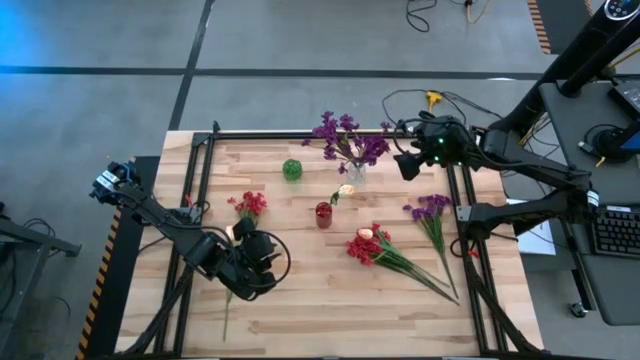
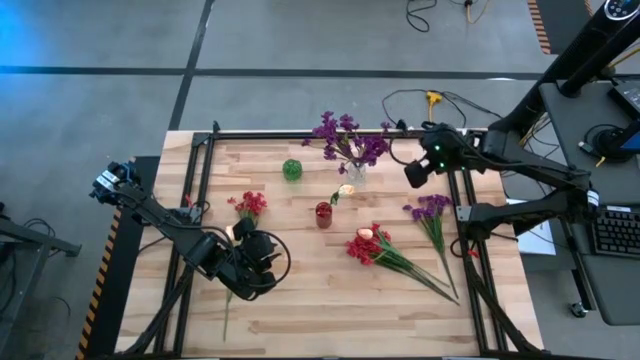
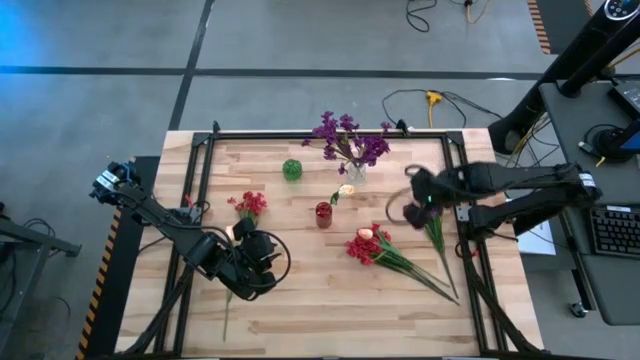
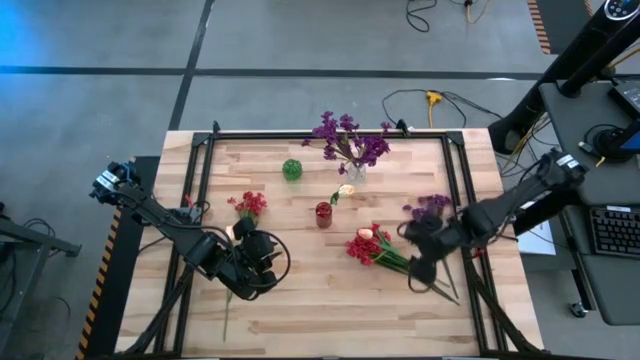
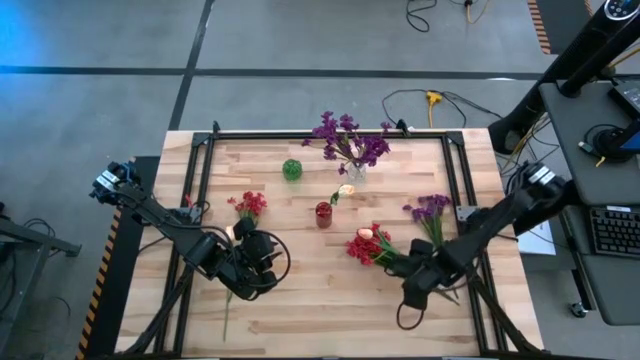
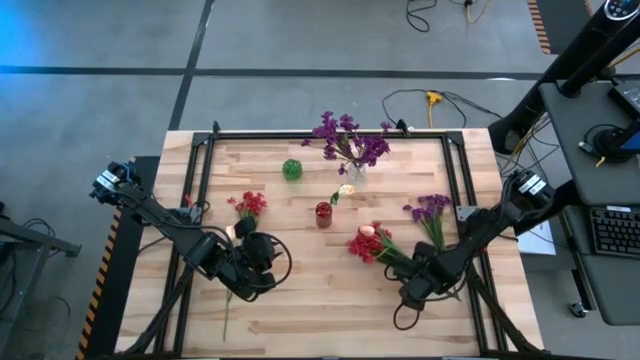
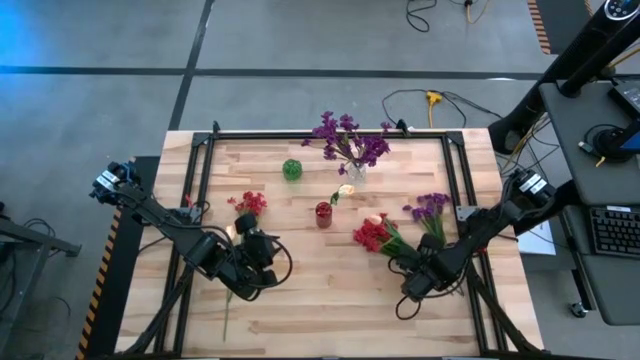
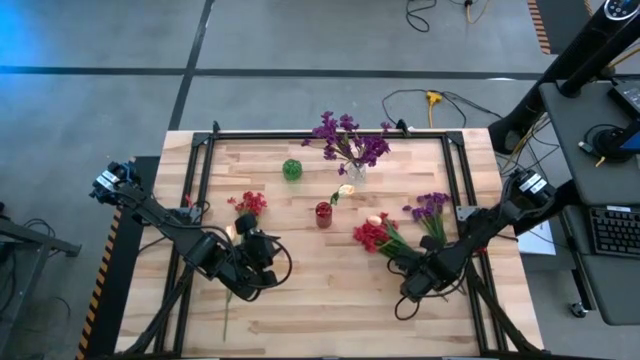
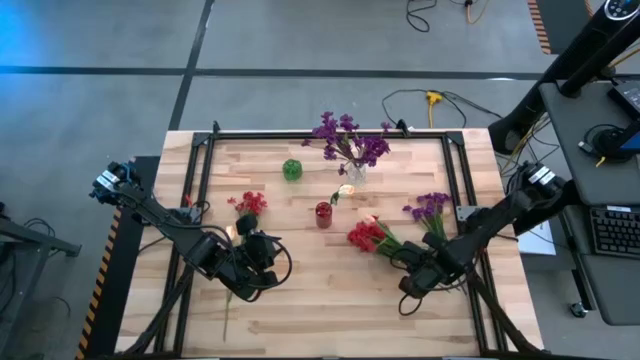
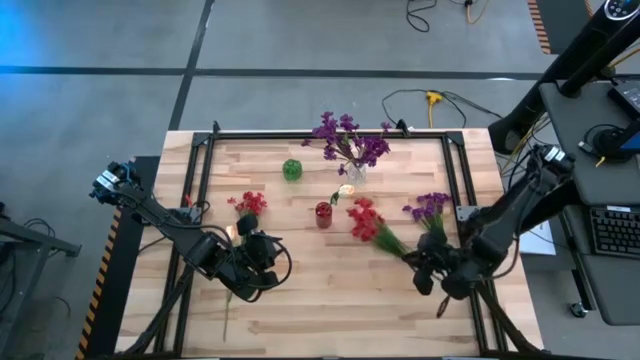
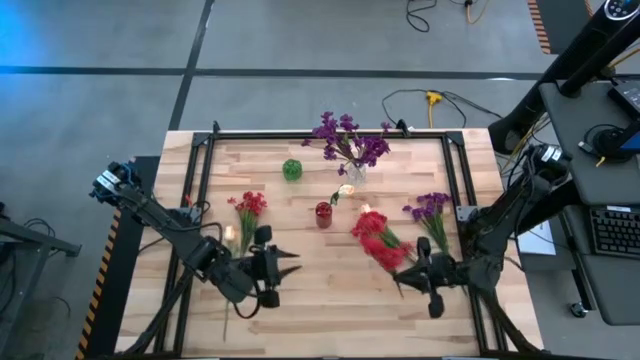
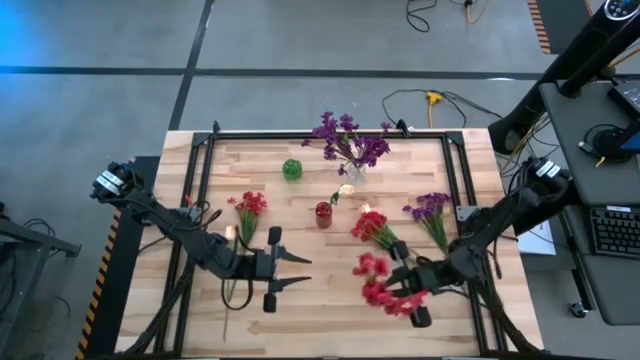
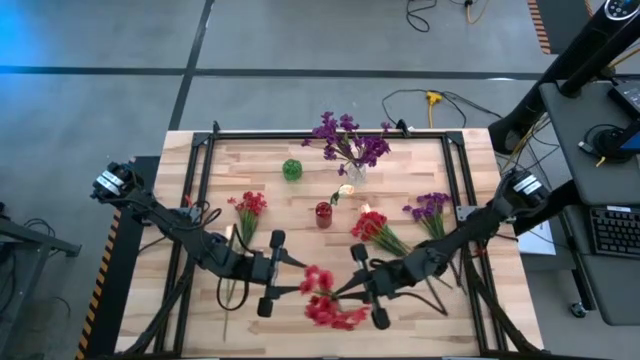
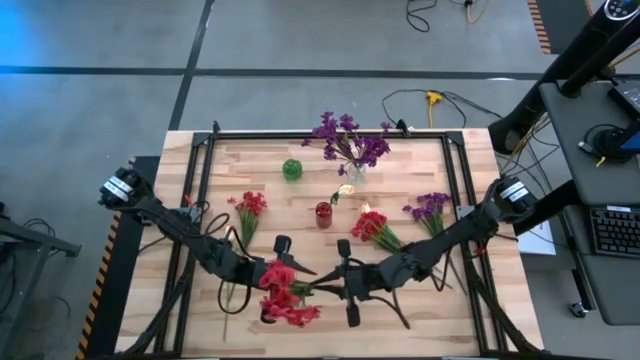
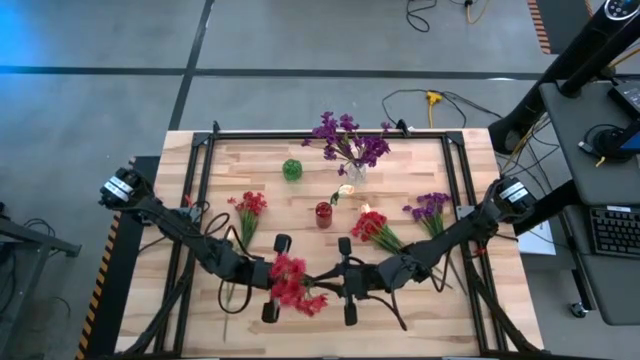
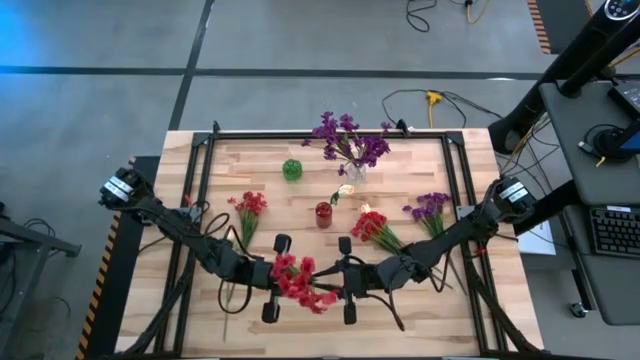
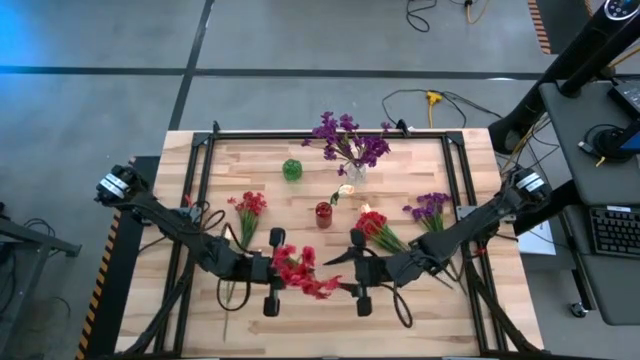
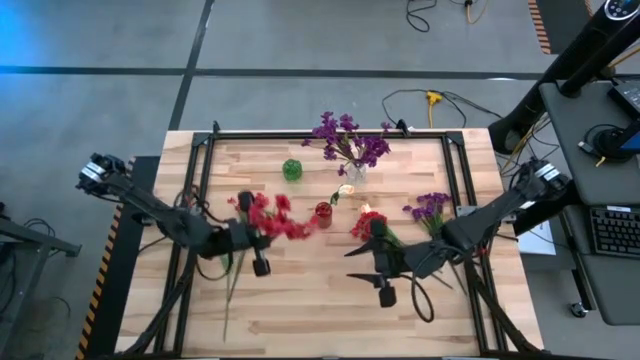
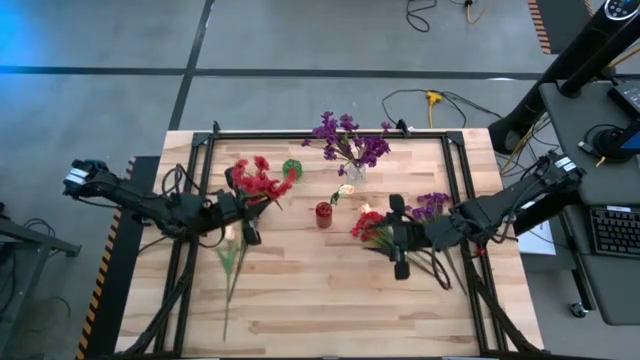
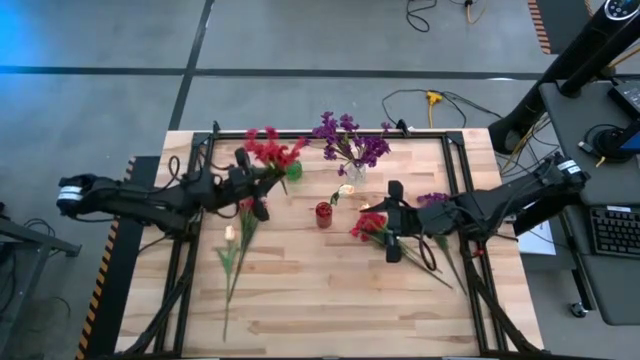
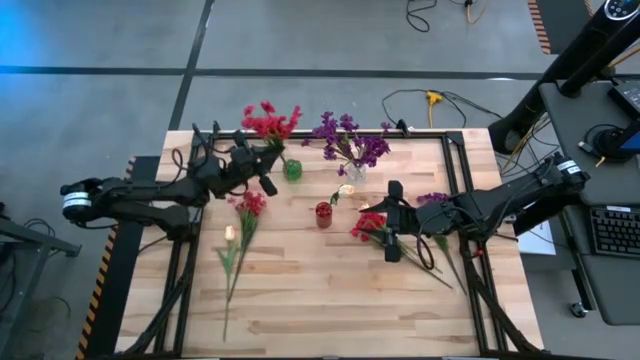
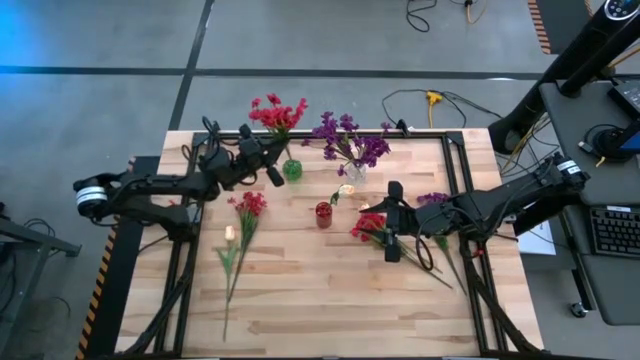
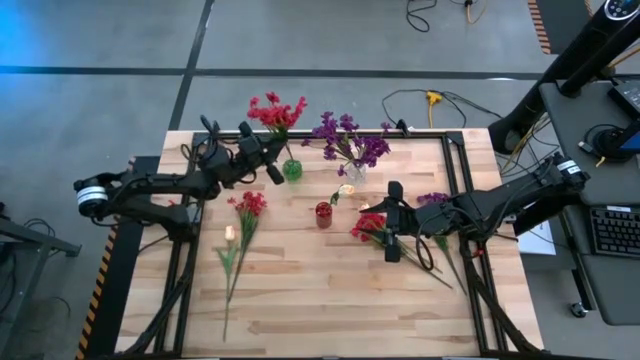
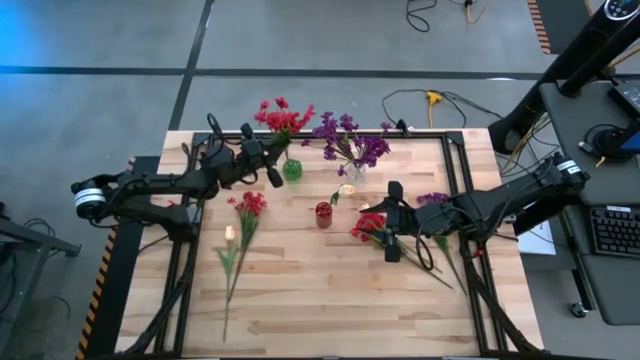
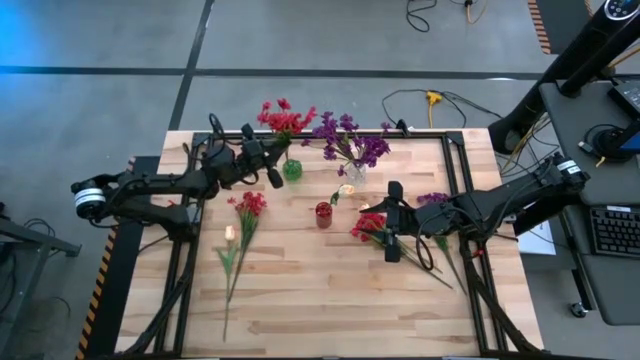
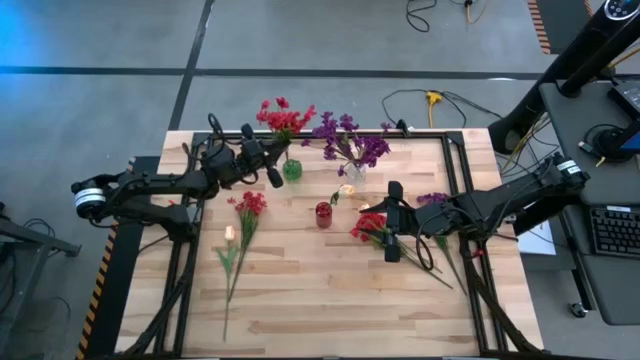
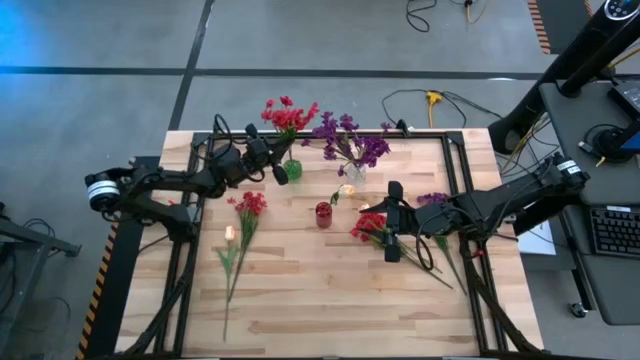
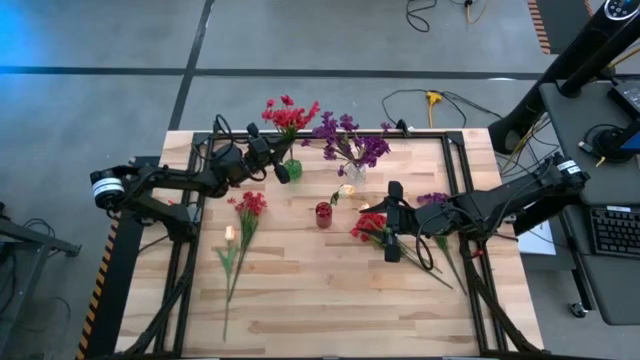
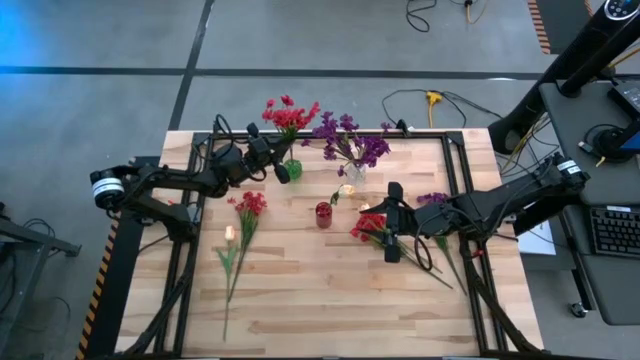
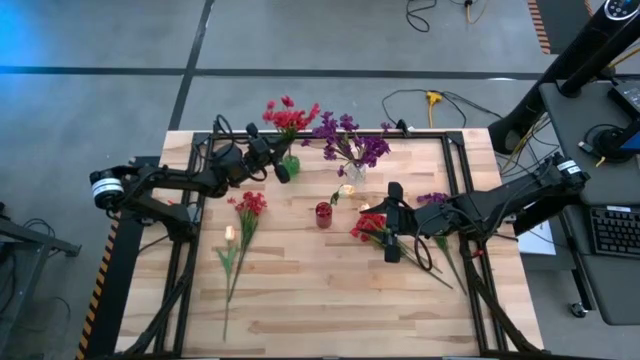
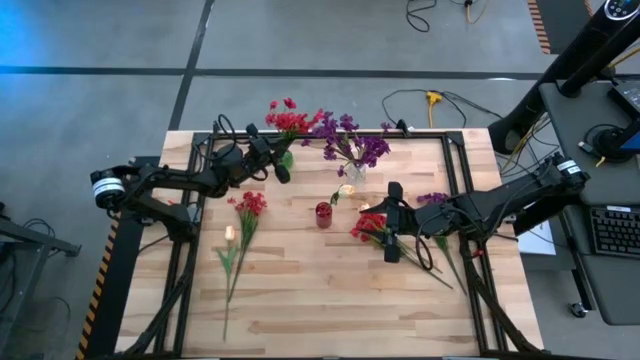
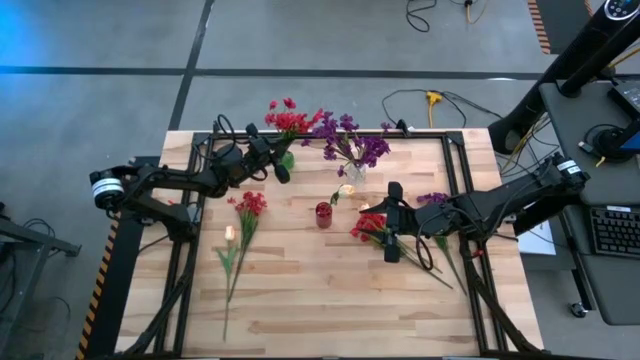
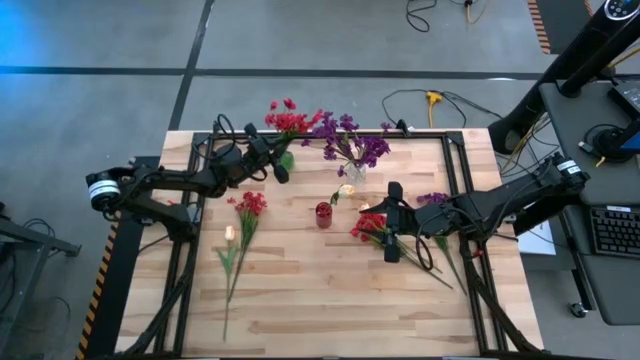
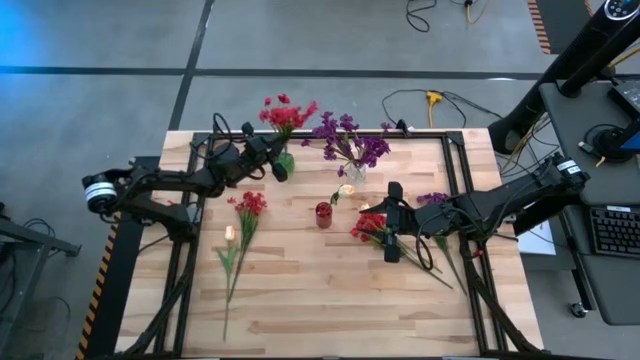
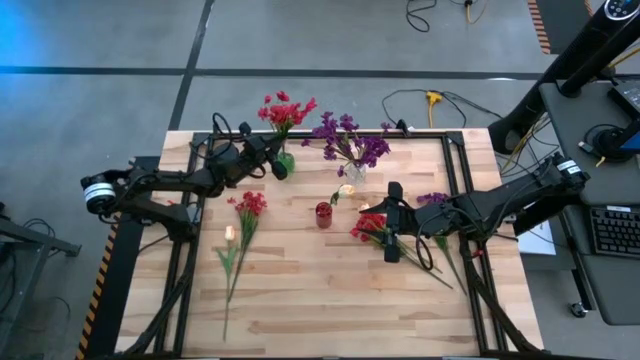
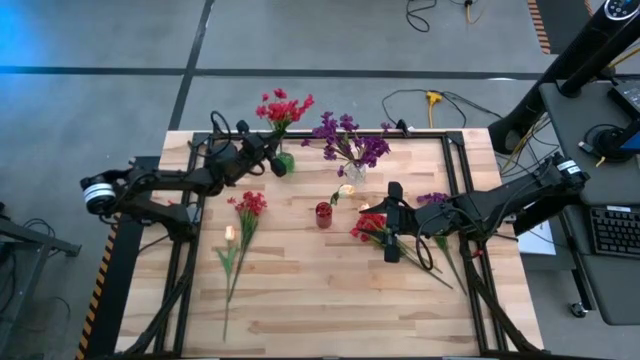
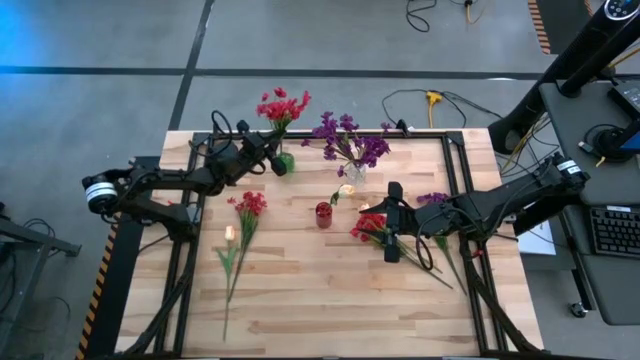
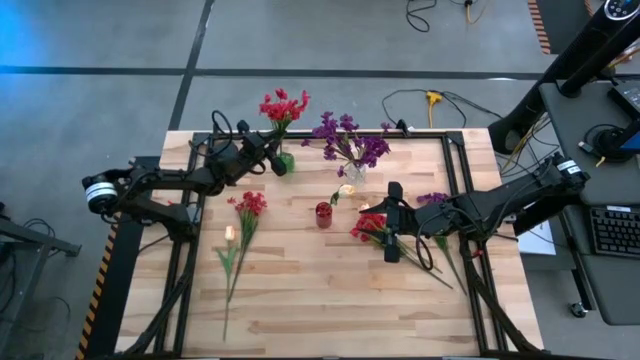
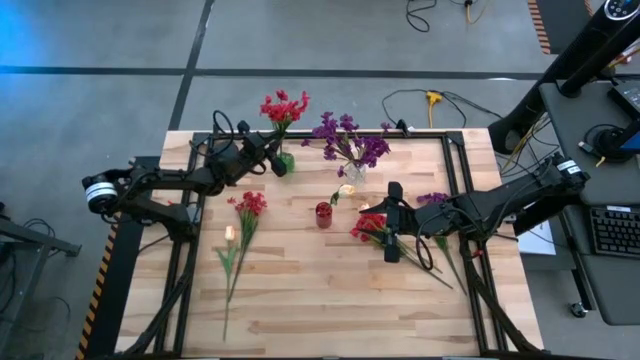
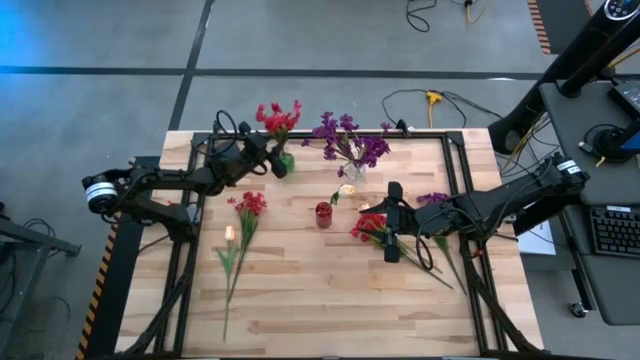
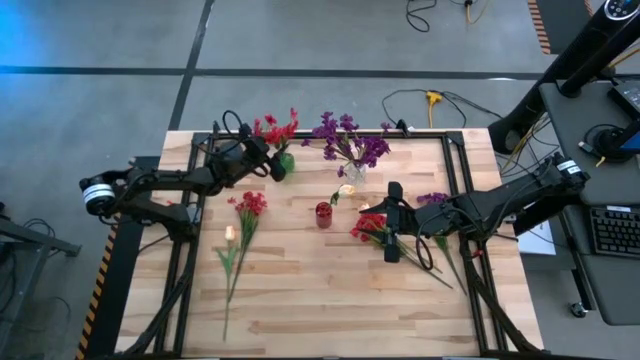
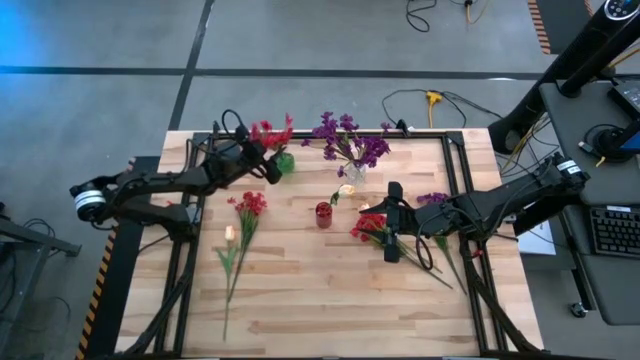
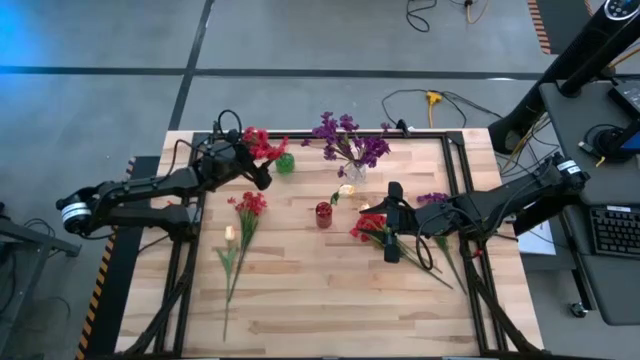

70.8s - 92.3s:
Task: Sort flowers into vase by color
Put the red flowers into the green vase
